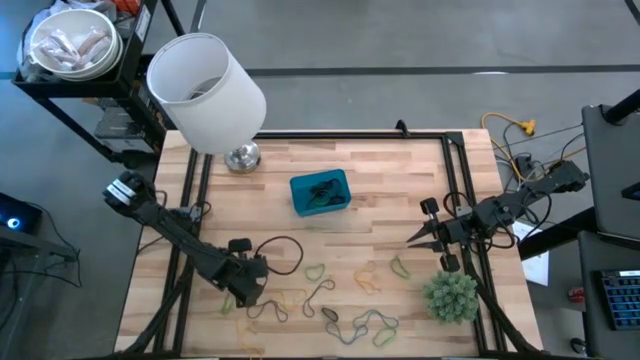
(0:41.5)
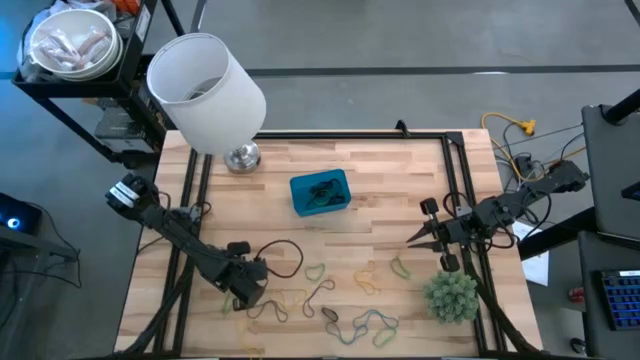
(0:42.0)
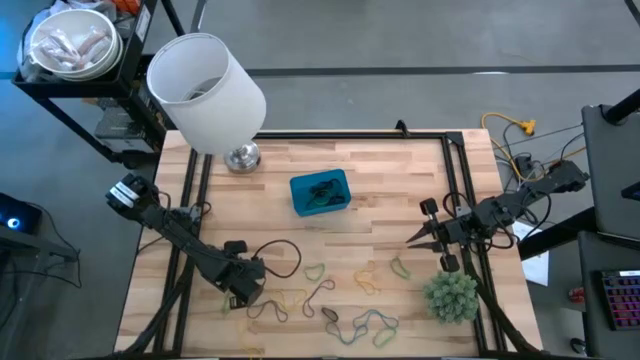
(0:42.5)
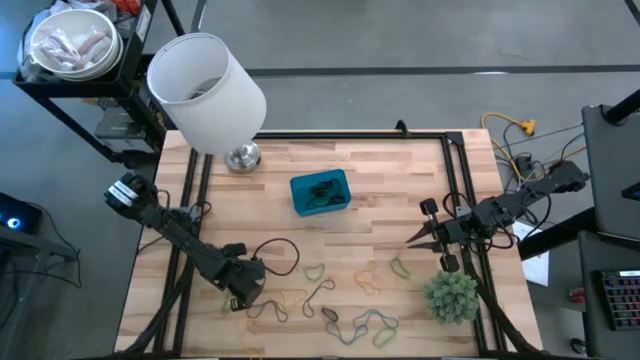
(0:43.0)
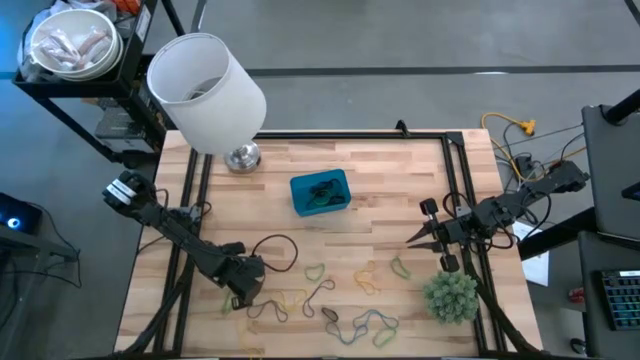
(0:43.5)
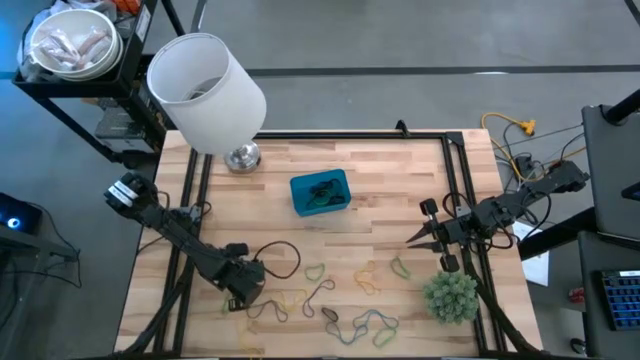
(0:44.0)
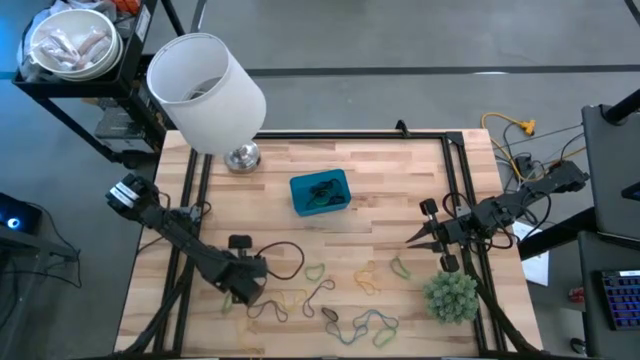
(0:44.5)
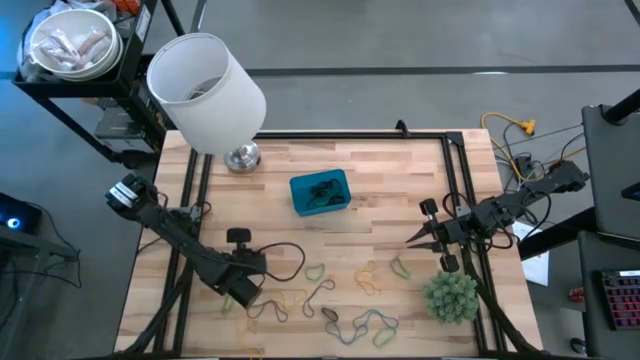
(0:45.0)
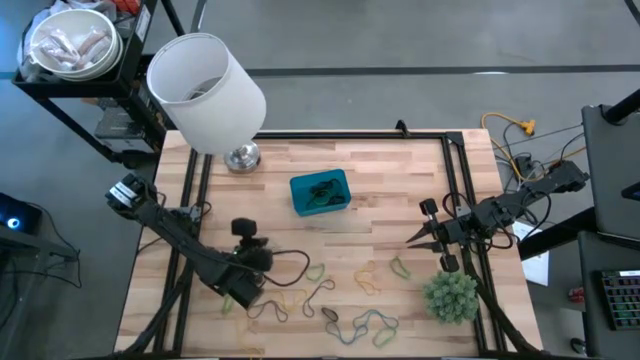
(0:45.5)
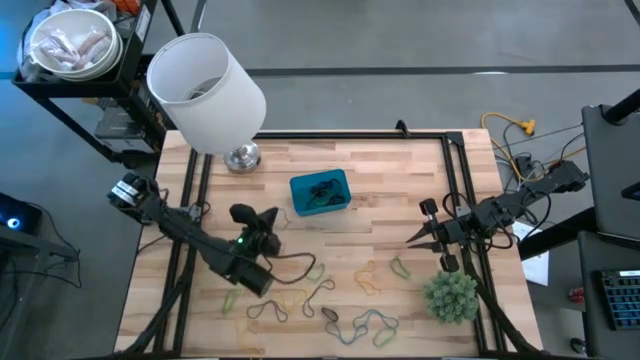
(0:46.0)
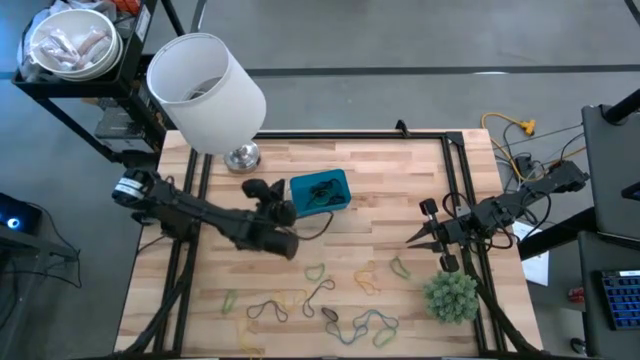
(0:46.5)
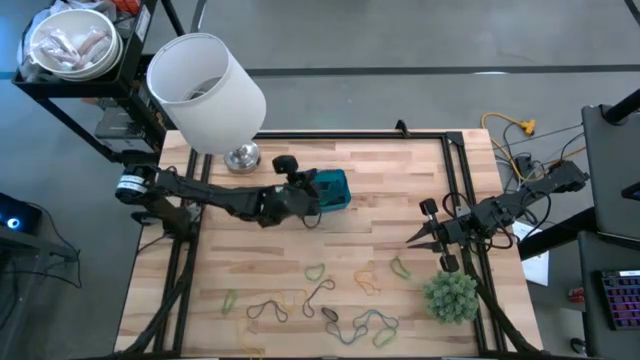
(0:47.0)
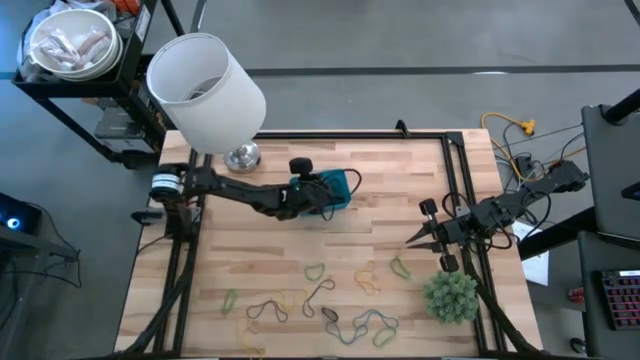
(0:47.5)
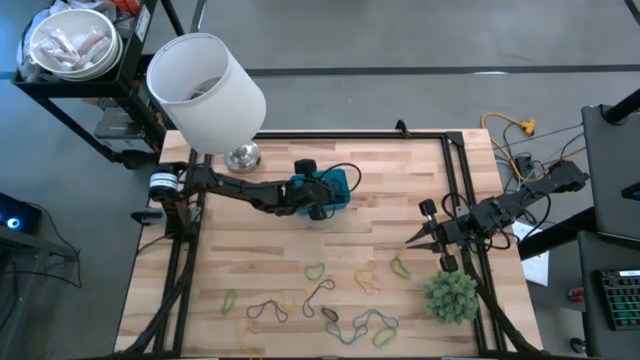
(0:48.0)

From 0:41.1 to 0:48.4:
Task: Pick and place rubber bands into bin
Put the blue rubber band into the blue bin

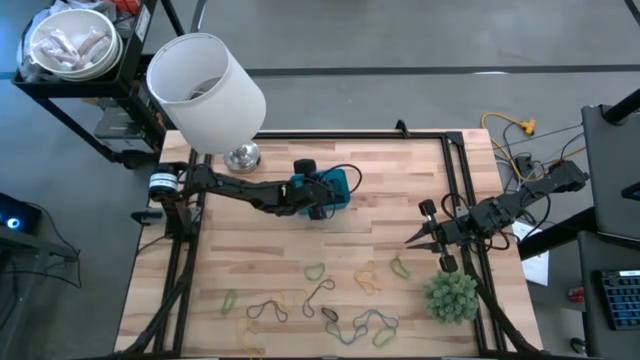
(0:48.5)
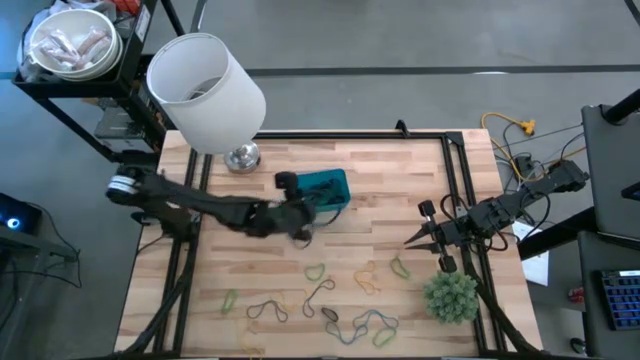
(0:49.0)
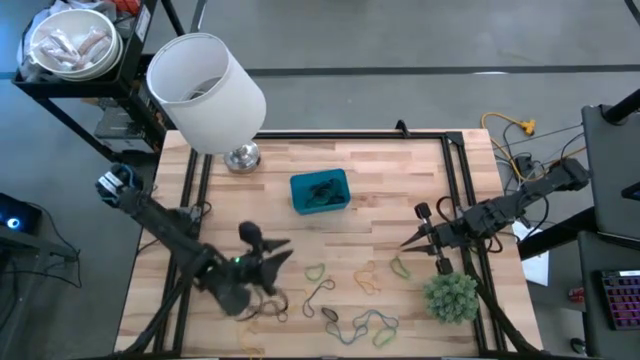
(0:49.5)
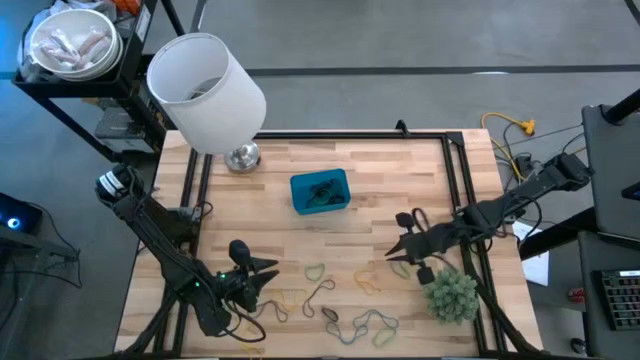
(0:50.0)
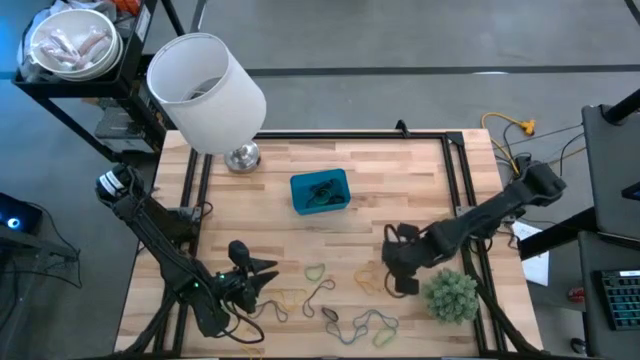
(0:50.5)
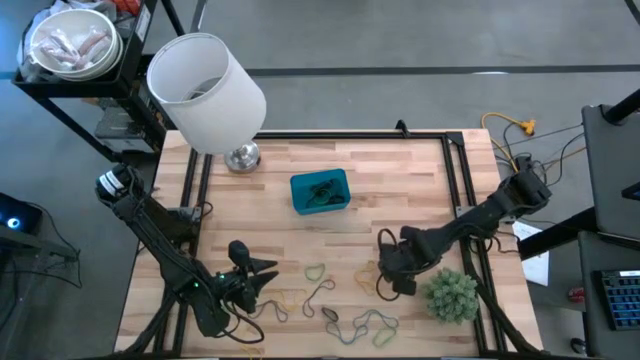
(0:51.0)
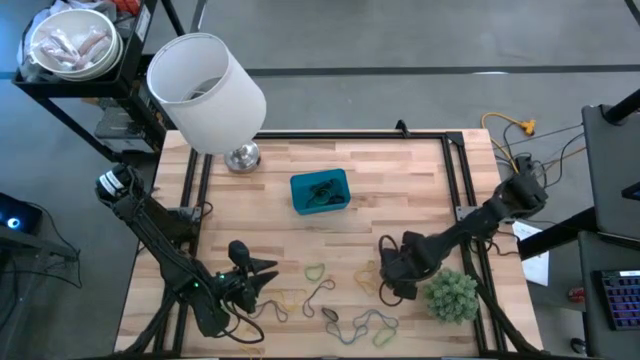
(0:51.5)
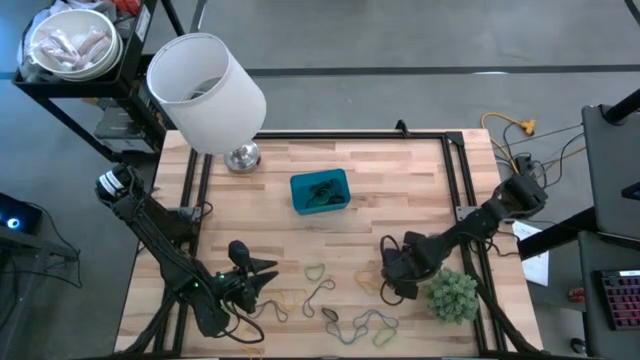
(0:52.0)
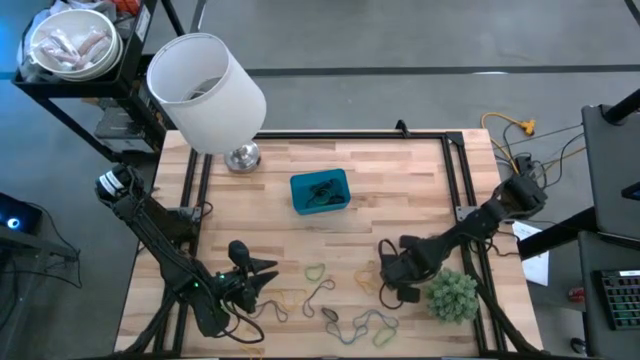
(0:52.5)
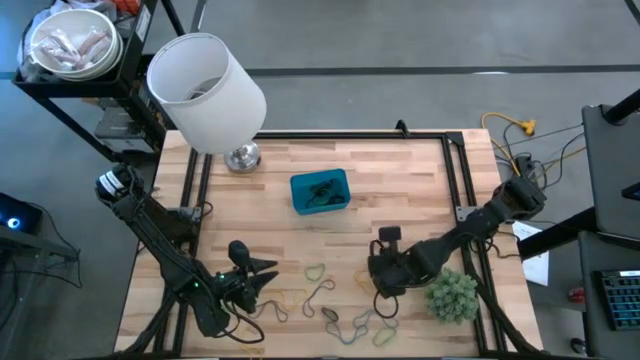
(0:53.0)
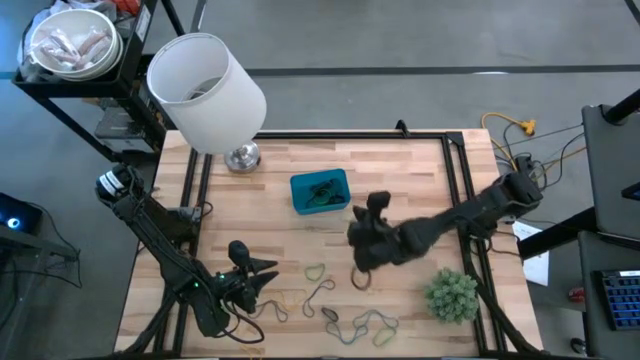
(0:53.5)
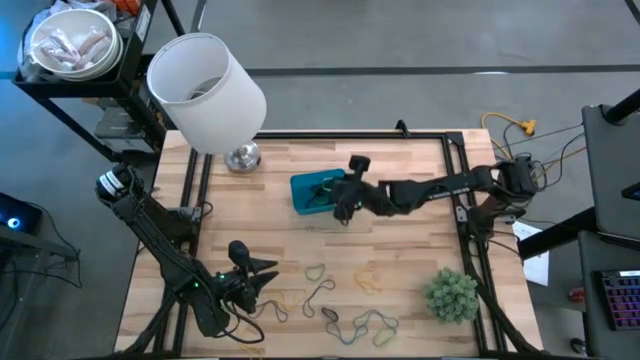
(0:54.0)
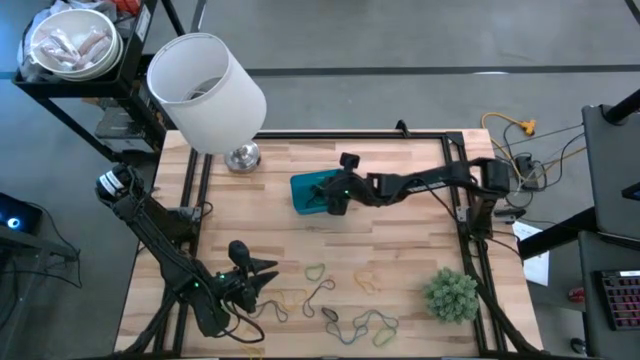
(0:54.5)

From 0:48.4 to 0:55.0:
Put the green rubber band into the blue bin

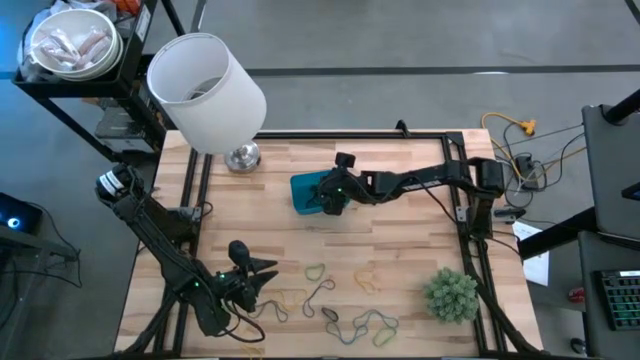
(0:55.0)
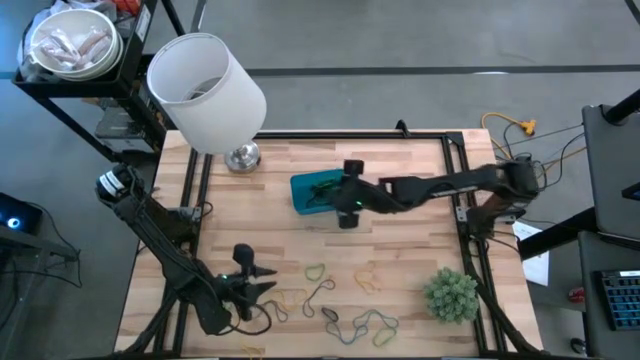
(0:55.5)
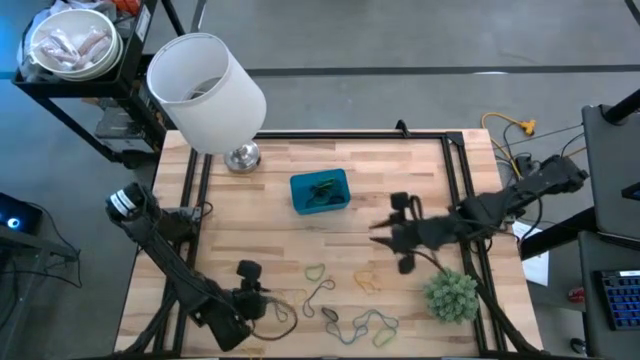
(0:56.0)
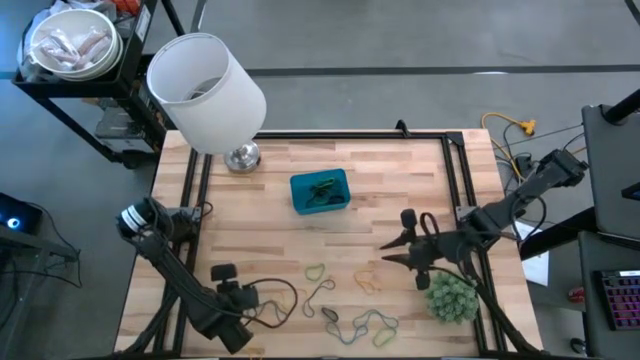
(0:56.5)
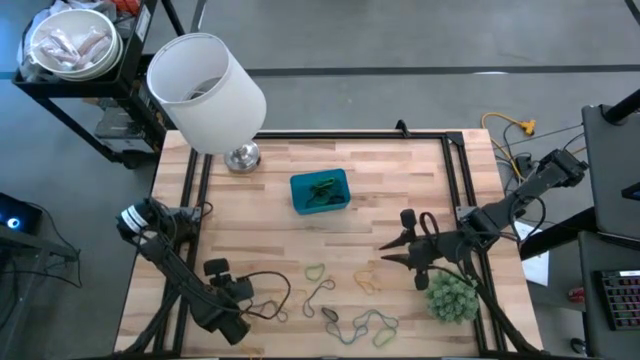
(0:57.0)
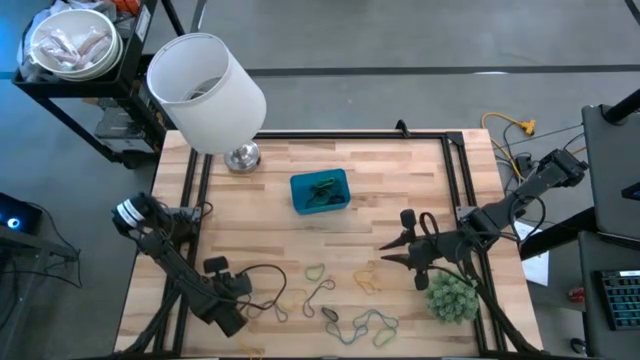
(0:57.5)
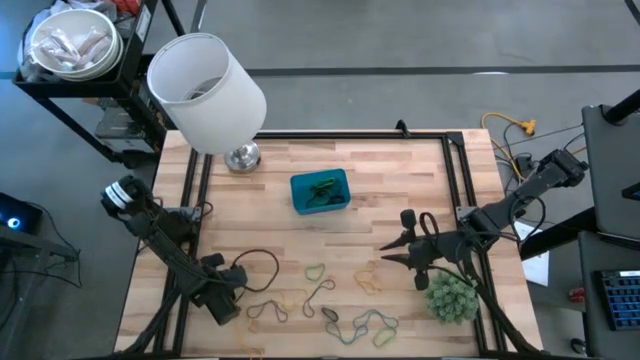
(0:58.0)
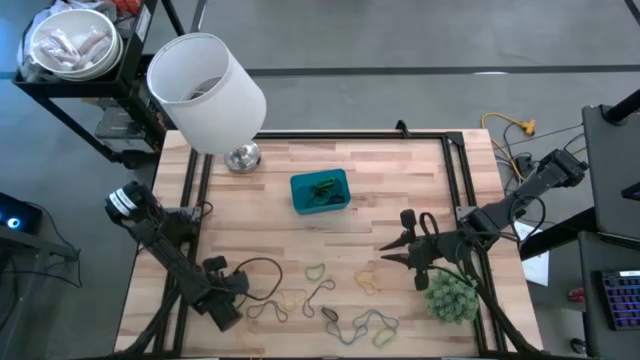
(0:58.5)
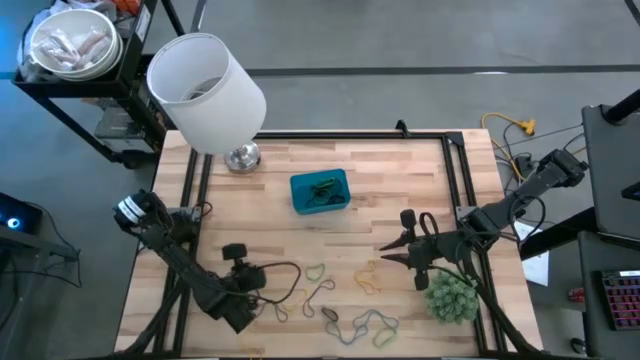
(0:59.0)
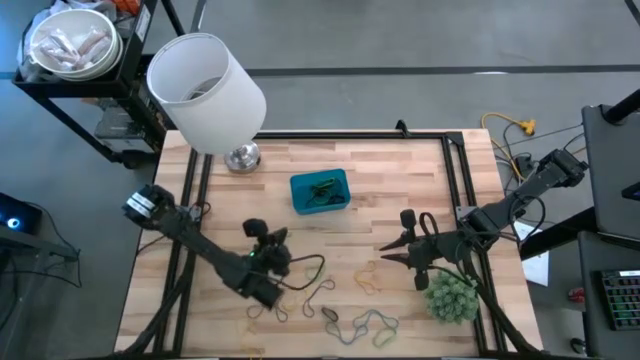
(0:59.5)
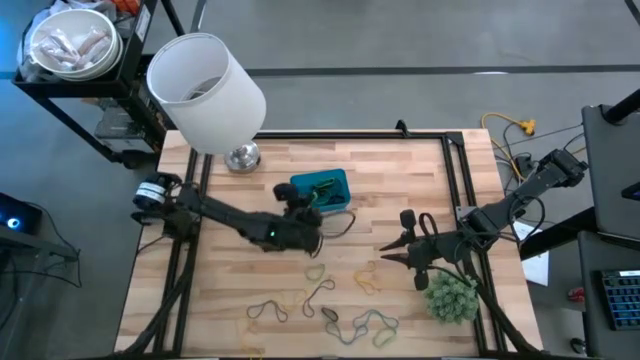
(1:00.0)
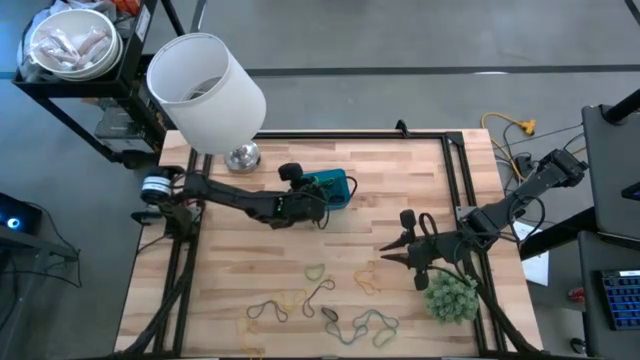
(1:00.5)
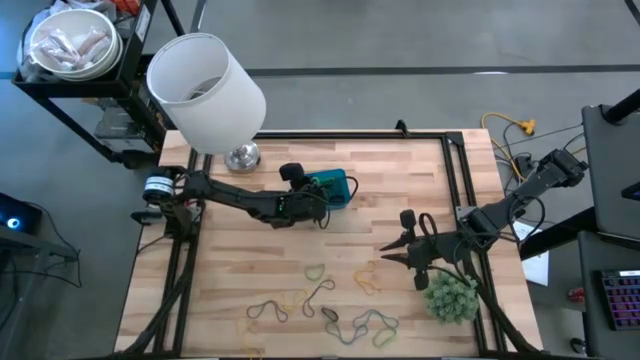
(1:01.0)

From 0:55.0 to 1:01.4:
Put the green rubber band into the blue bin

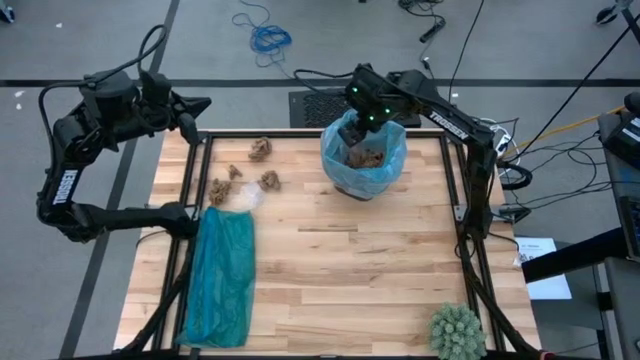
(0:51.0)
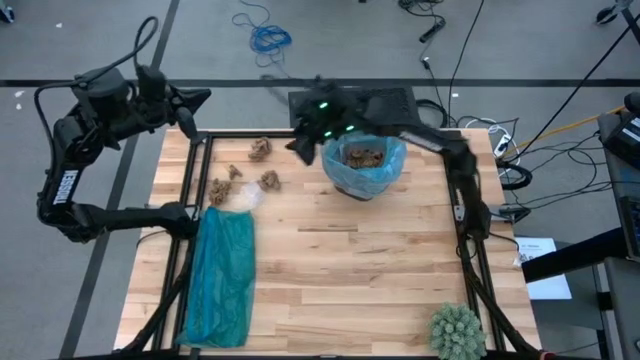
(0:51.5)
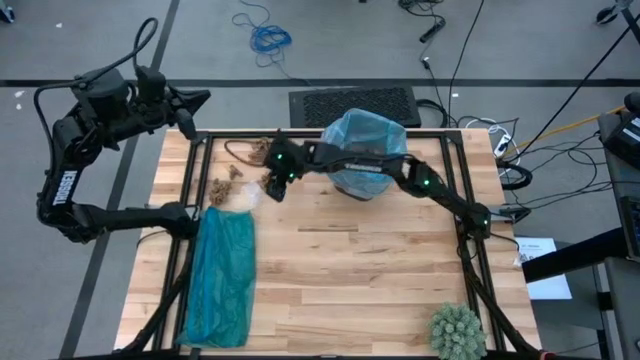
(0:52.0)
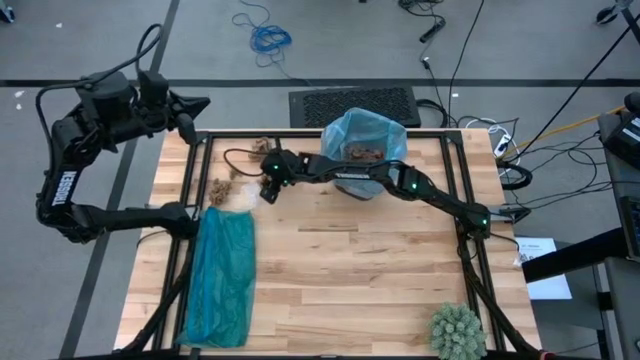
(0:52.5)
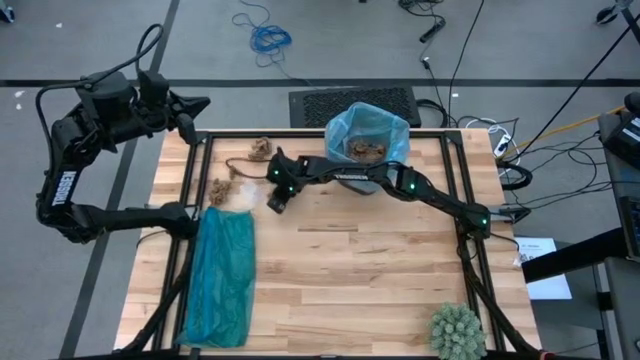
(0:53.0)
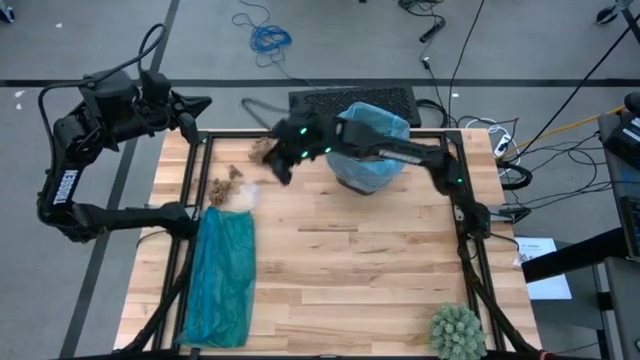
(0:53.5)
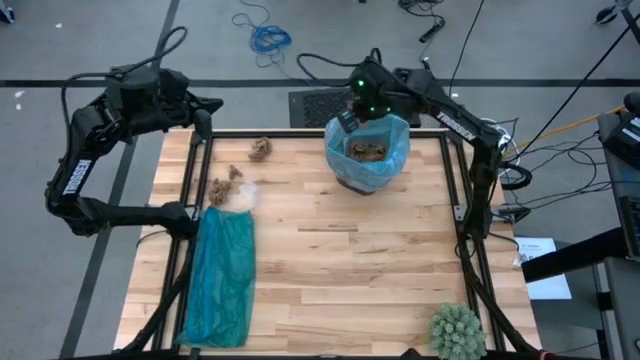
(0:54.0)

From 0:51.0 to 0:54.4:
Task: place trash/remove bag and relplace
Put the brown napkin into the trash bin
